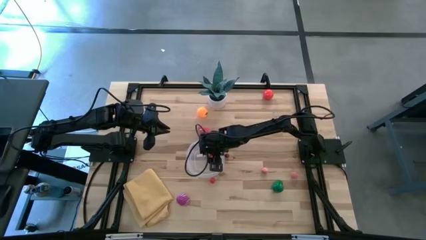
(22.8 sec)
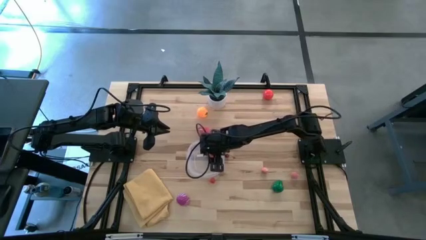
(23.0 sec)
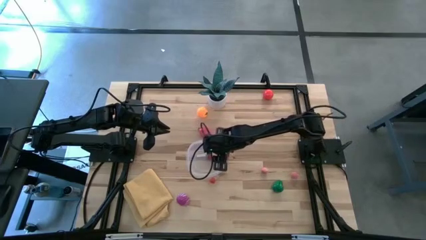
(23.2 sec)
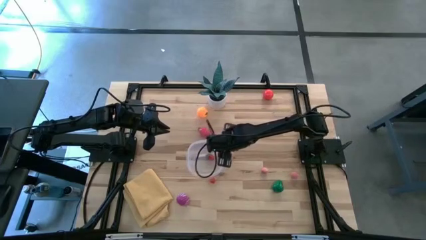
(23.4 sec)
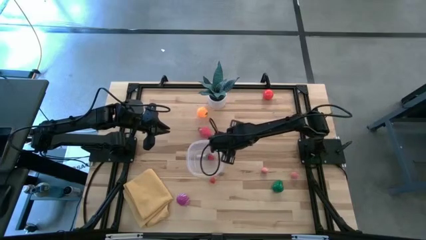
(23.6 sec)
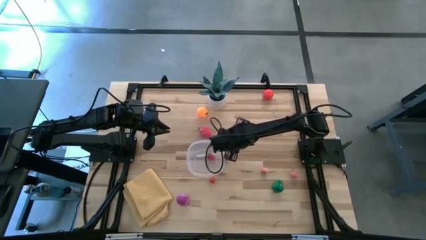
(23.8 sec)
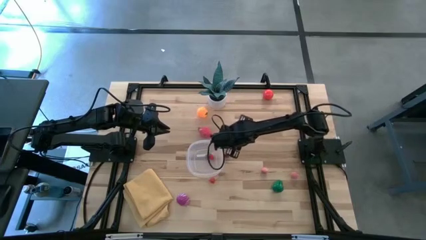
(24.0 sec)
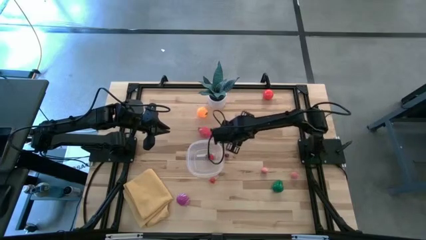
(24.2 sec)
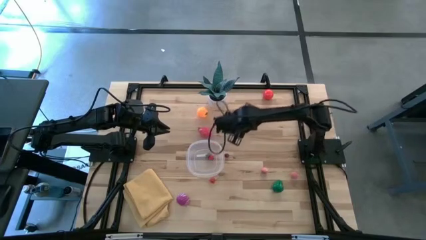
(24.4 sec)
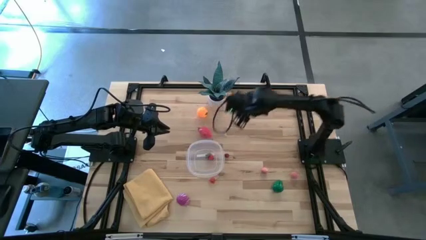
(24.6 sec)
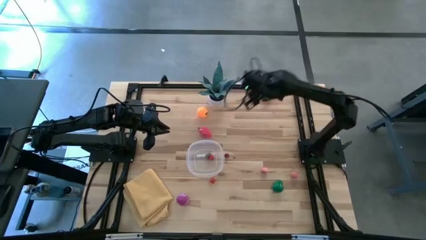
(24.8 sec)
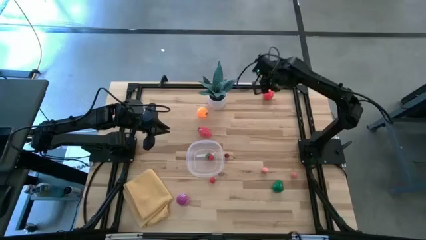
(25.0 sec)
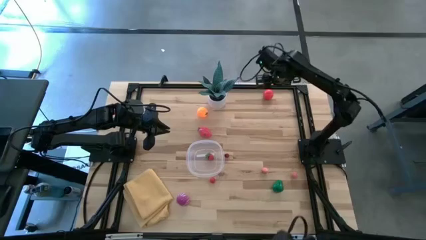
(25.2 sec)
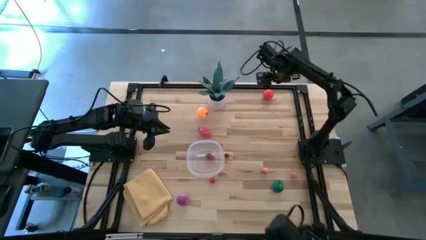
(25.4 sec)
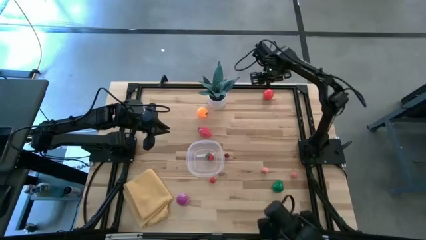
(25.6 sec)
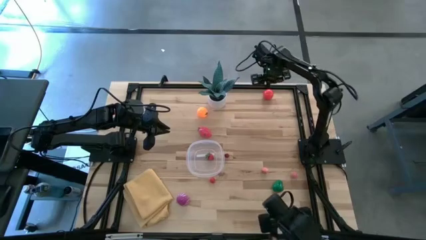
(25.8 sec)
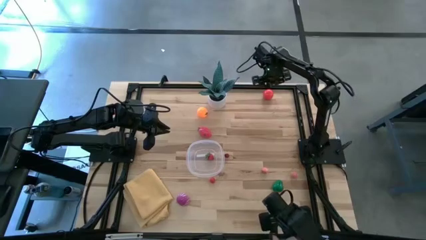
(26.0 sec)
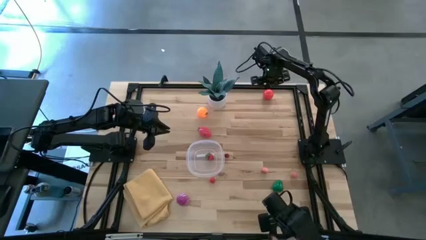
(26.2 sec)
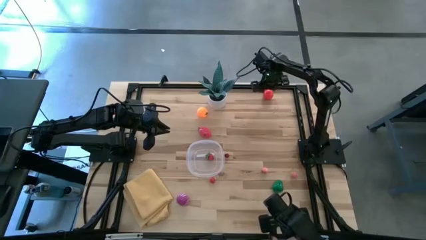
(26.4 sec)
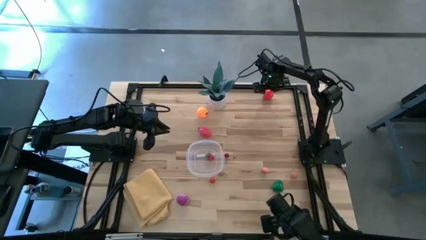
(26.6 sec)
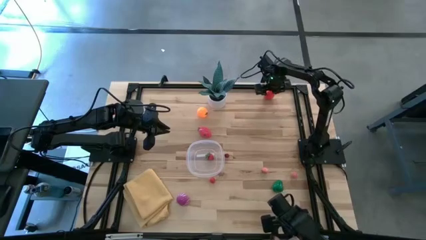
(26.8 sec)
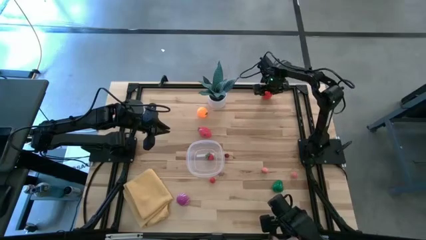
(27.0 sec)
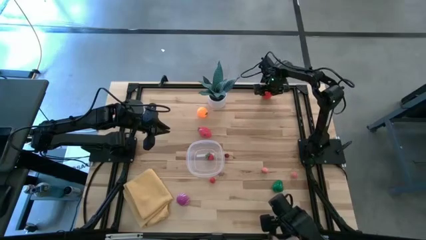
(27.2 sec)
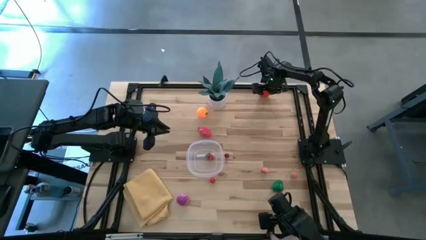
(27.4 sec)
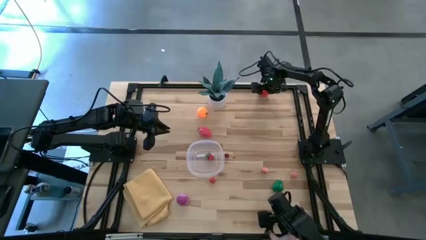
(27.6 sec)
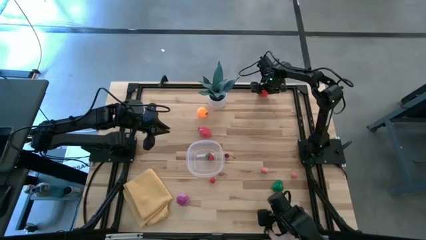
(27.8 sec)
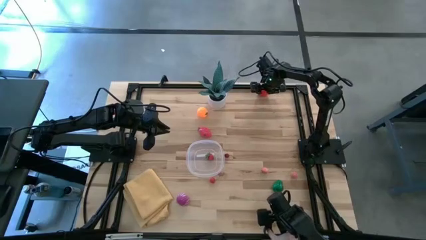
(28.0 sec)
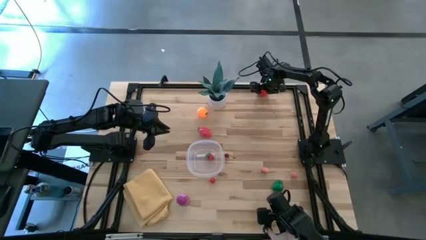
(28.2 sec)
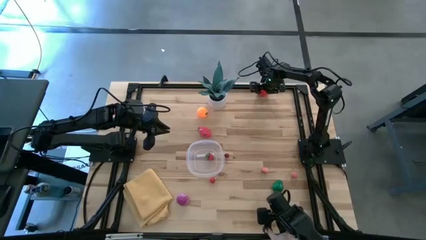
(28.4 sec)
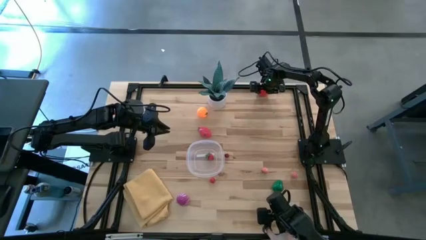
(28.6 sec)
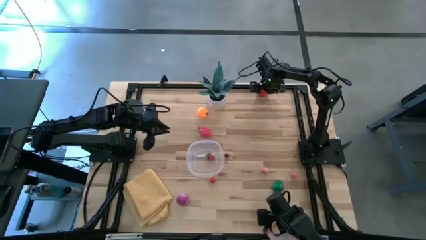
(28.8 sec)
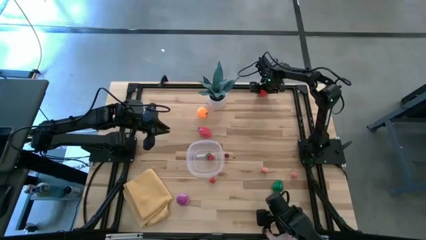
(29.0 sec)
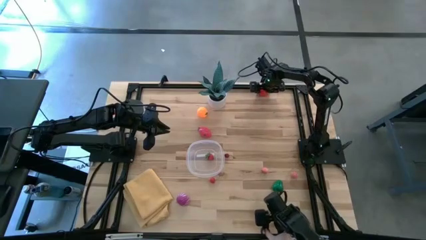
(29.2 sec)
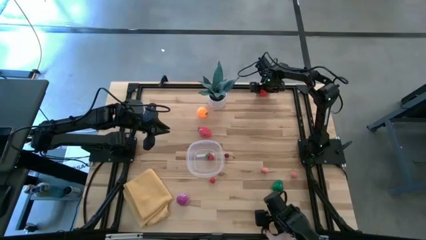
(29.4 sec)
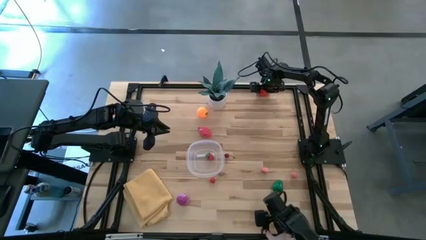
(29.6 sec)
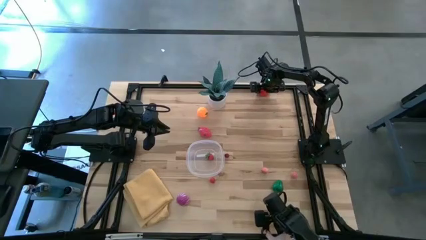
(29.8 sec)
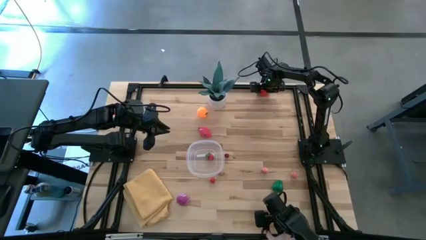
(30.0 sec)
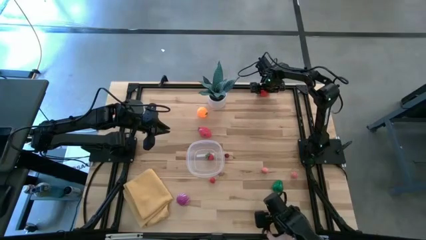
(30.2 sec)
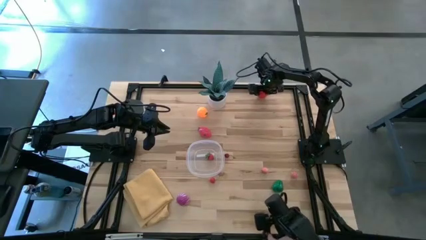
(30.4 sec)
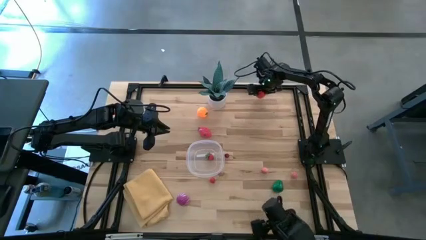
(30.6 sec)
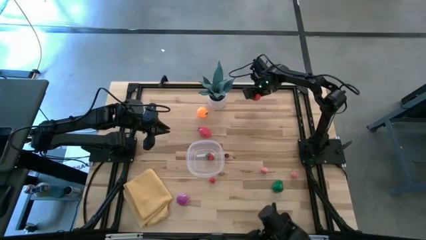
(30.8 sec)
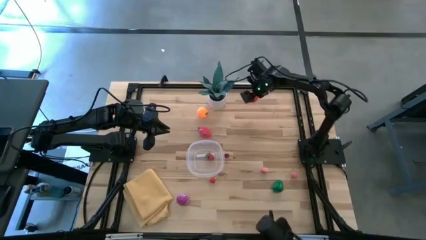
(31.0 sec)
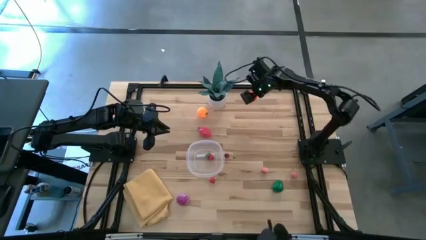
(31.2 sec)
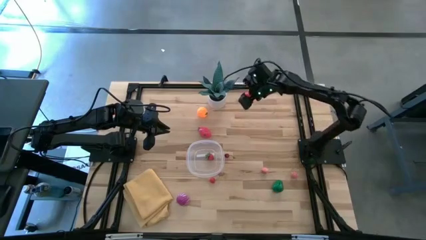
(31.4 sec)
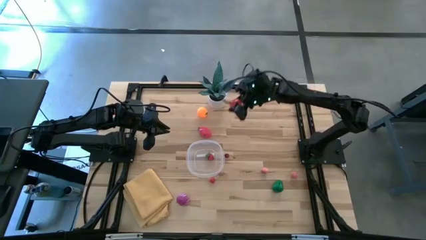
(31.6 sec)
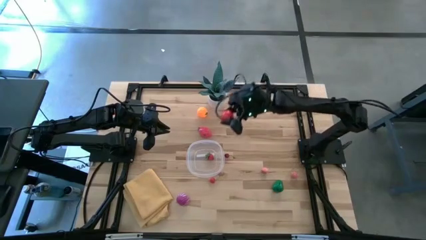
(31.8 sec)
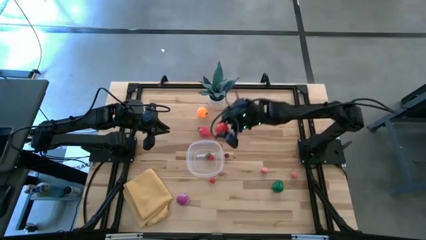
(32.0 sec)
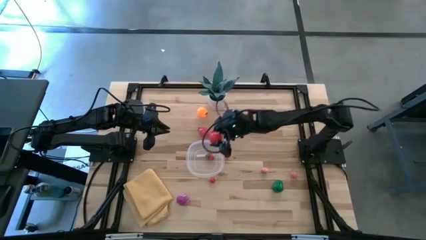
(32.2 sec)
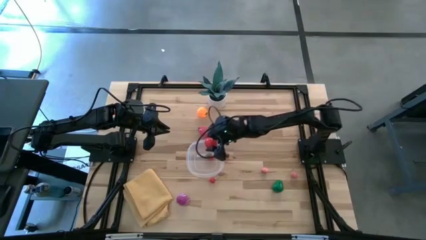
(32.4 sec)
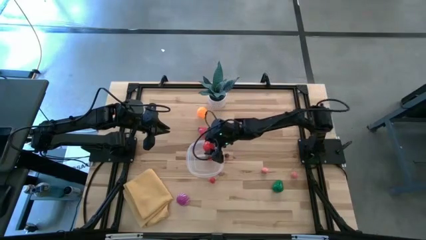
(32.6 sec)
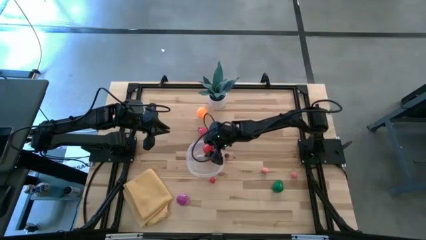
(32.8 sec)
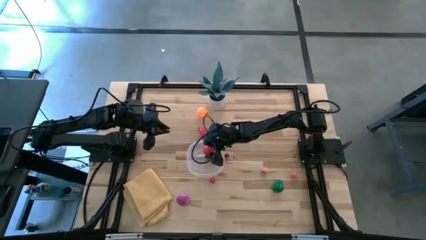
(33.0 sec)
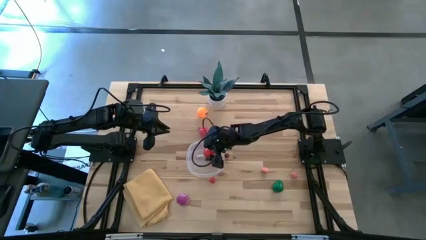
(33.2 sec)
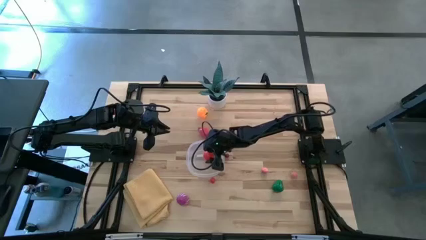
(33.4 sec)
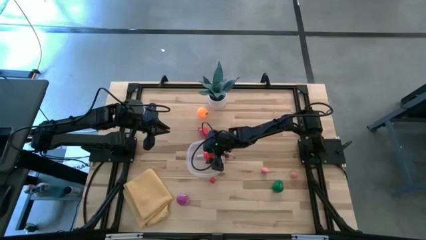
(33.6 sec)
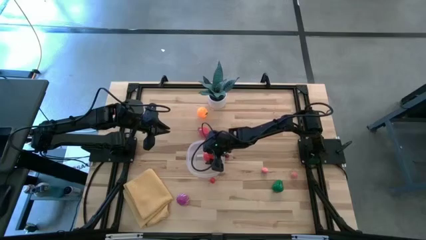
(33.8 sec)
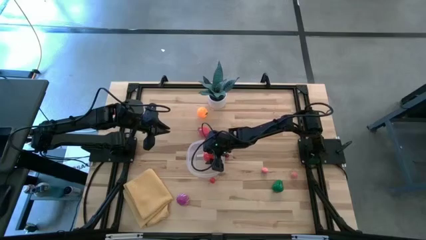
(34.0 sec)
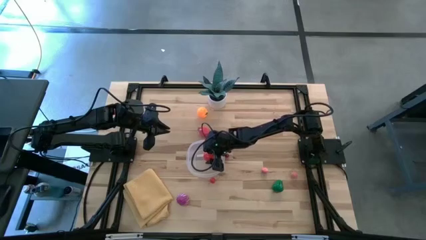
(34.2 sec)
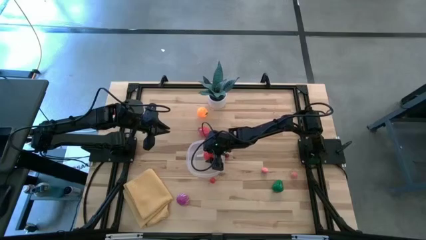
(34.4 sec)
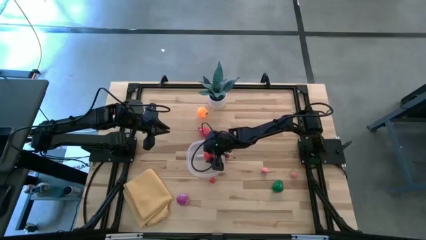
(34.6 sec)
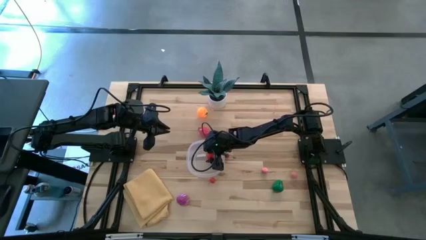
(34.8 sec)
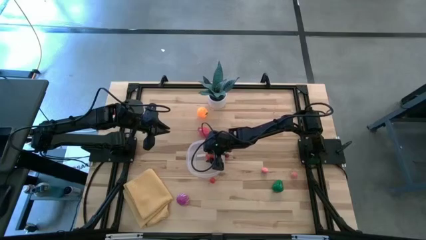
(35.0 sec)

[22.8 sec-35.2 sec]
Task: Pick and placing Produce into tupperware
Put the red tomato into the transparent bin

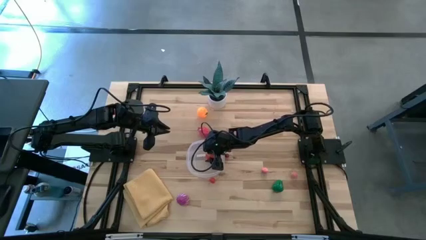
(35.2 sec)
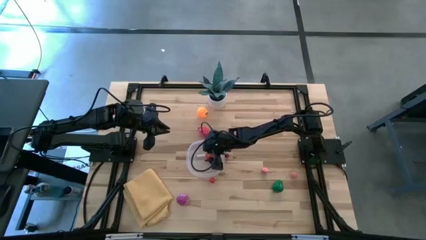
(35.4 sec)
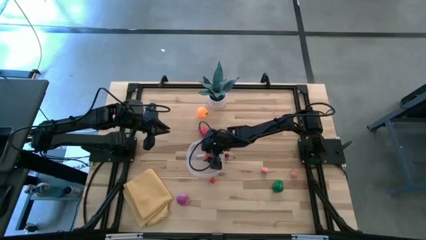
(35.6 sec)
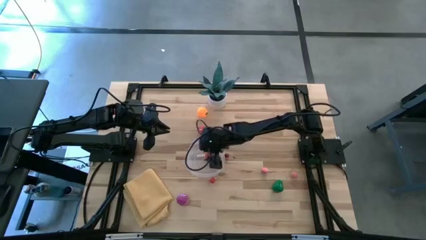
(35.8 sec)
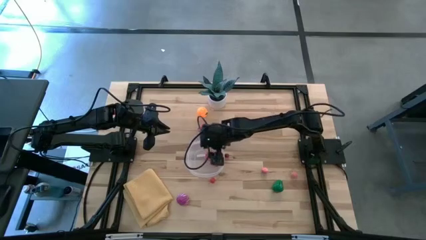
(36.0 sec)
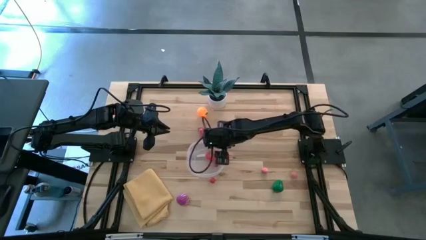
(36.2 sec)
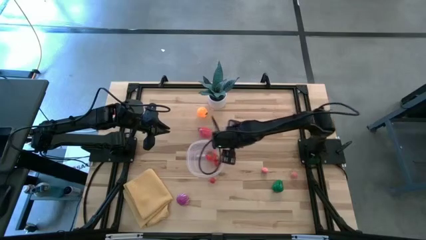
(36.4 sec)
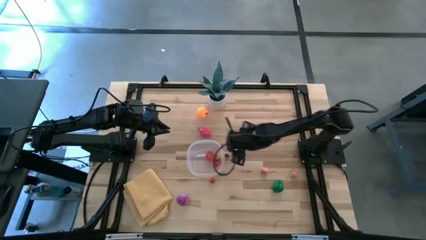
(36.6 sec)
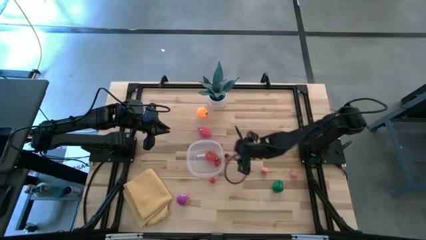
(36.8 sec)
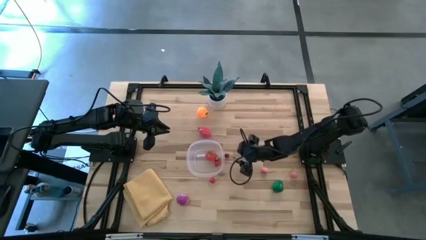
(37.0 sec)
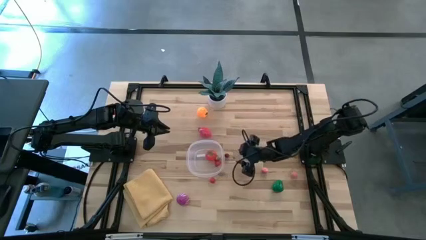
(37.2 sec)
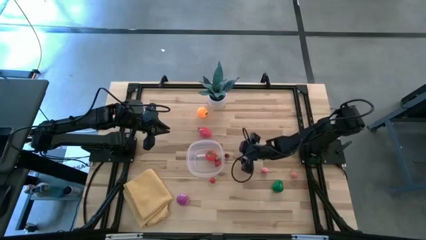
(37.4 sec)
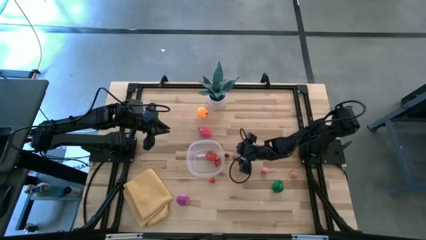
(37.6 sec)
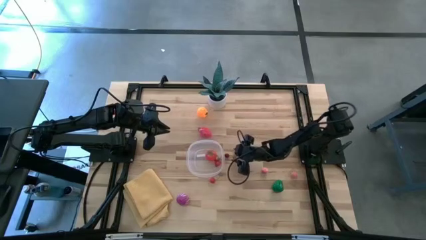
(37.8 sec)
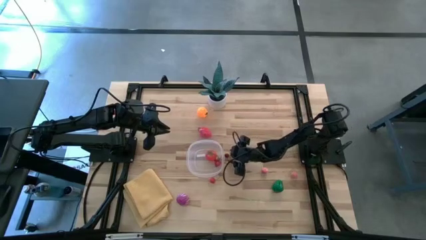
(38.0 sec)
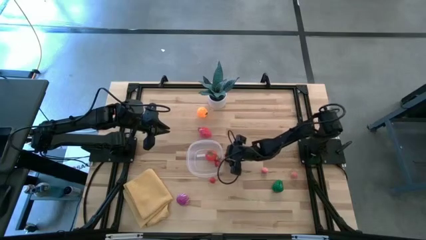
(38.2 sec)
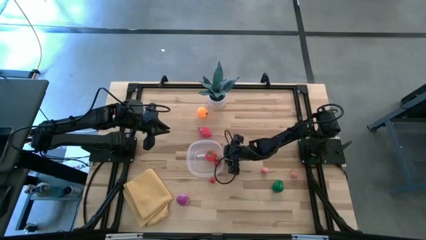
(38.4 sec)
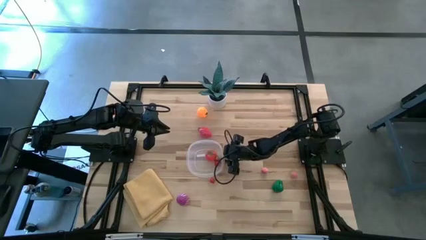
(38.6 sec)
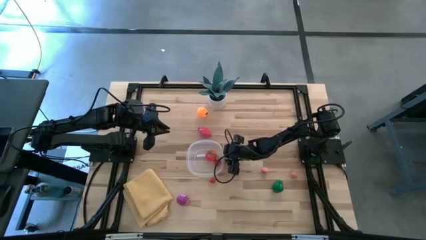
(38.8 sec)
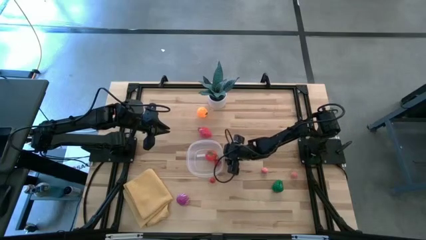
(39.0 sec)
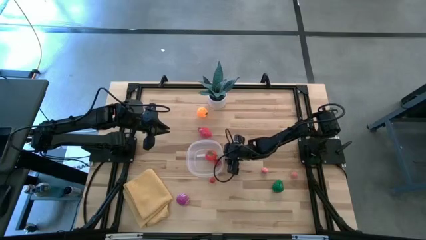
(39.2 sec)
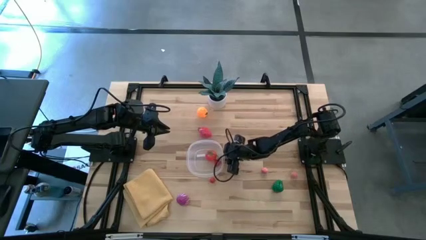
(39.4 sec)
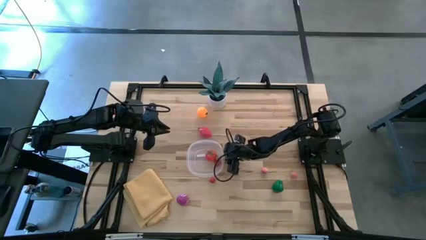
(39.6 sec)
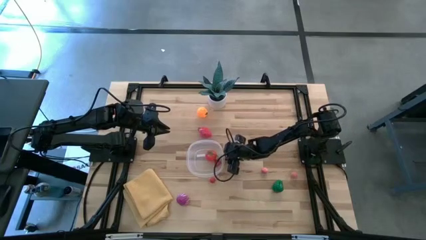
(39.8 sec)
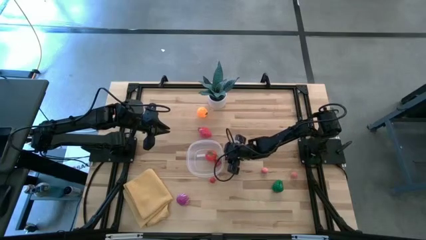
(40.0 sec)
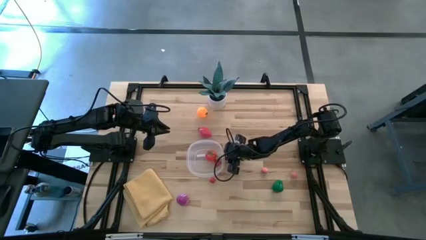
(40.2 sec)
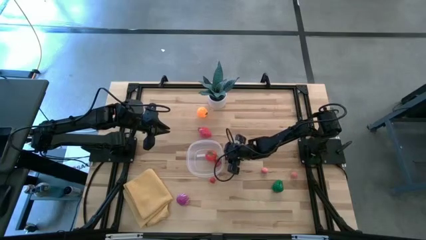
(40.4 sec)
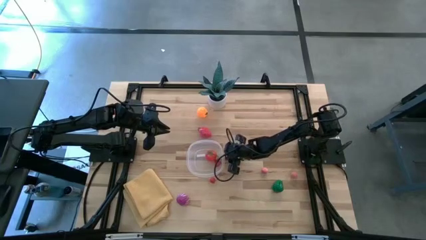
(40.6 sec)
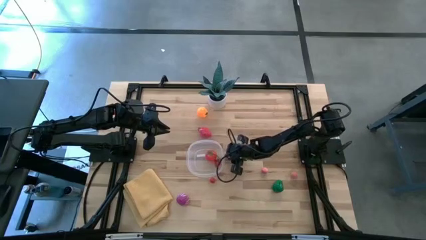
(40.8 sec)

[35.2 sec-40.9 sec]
Put the dark red cherry into the transparent bin
